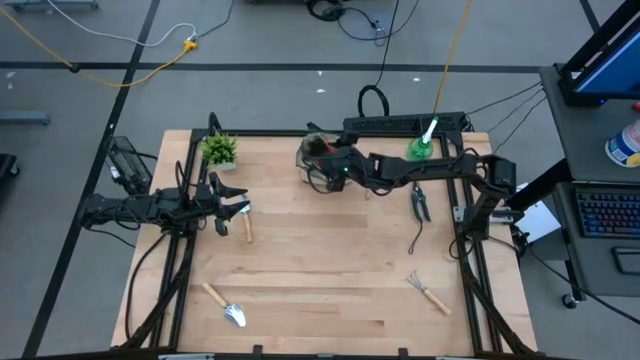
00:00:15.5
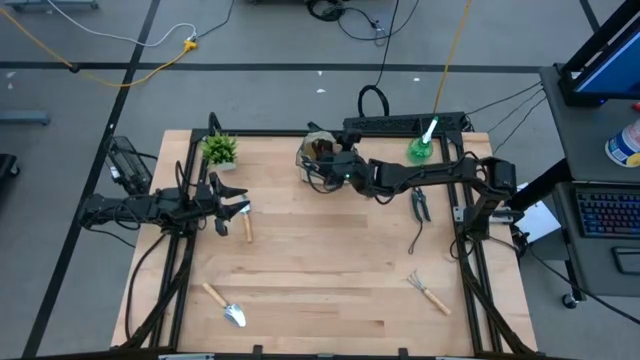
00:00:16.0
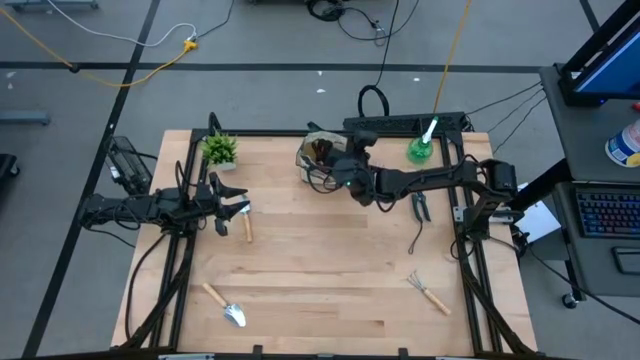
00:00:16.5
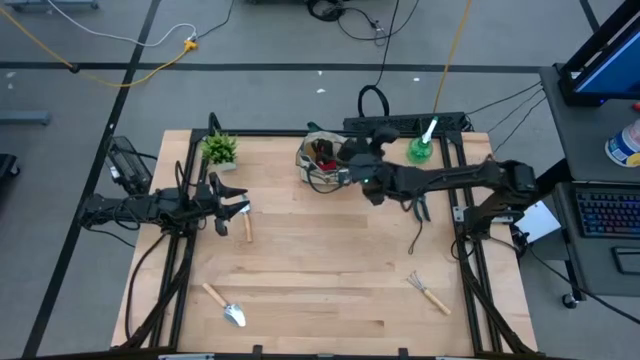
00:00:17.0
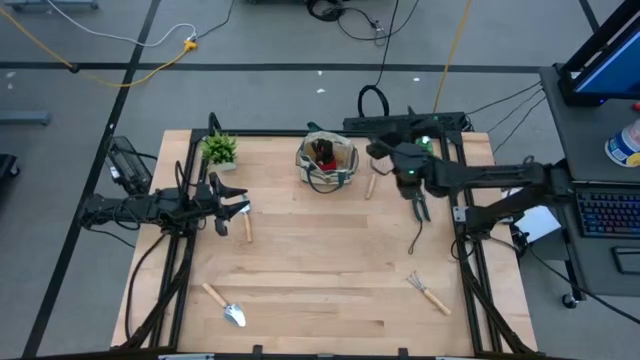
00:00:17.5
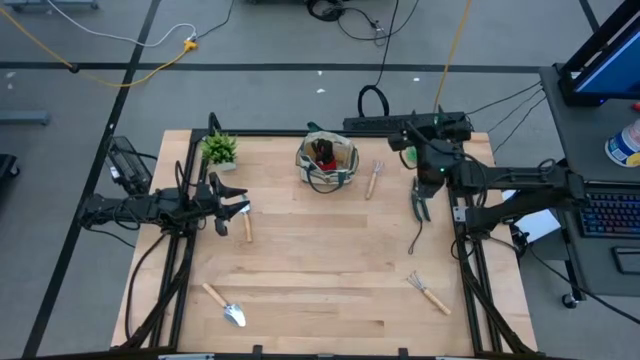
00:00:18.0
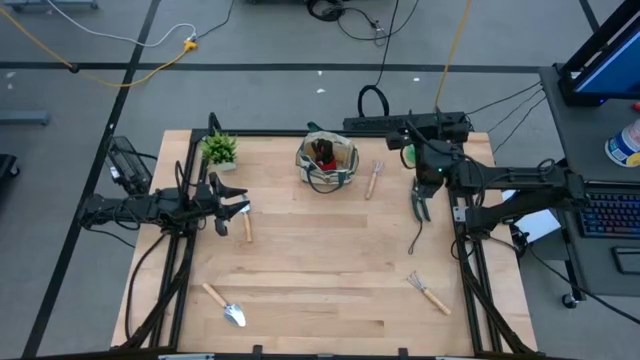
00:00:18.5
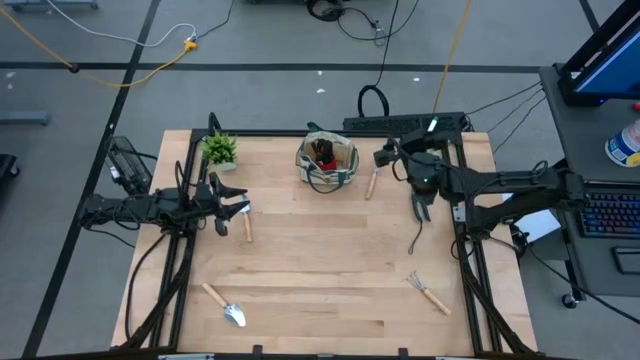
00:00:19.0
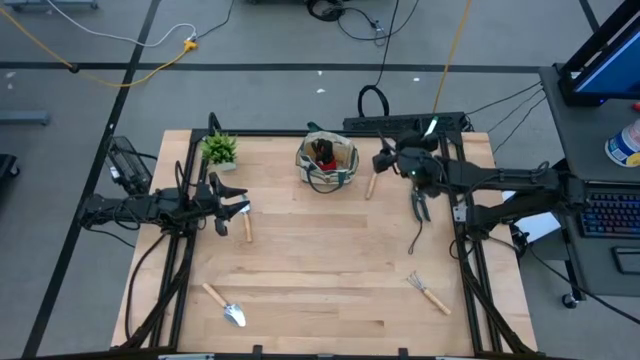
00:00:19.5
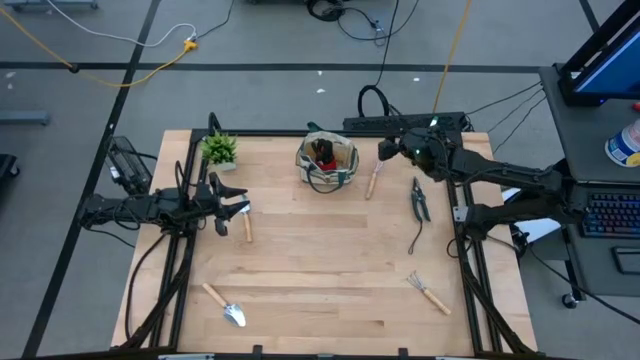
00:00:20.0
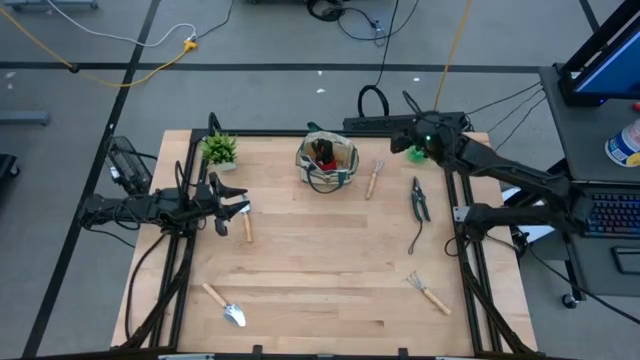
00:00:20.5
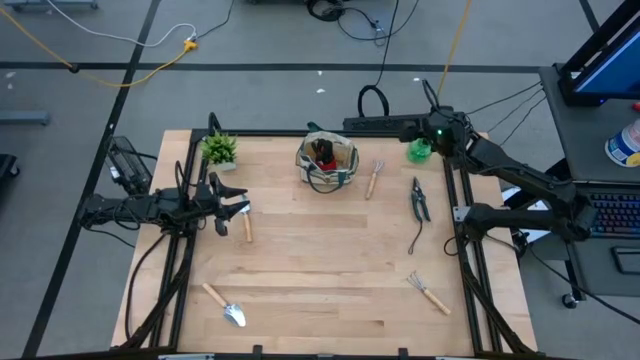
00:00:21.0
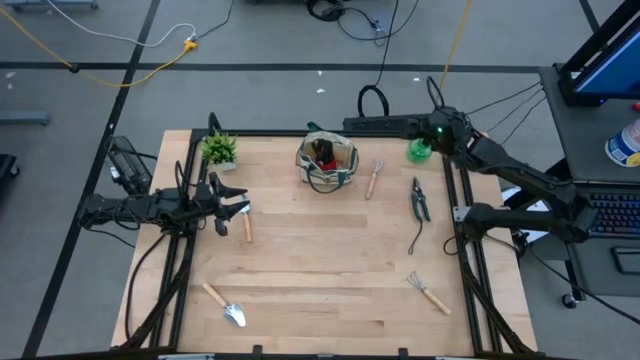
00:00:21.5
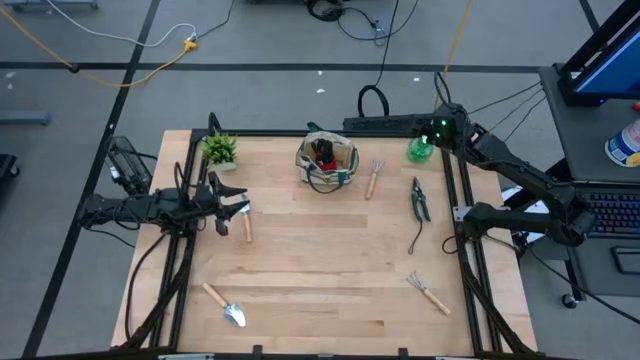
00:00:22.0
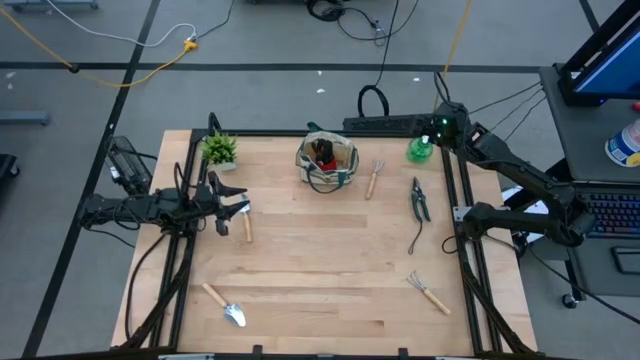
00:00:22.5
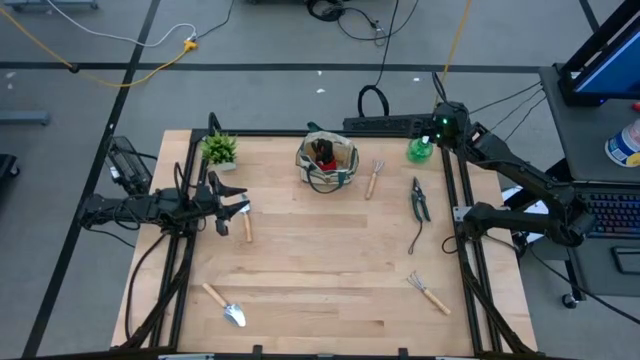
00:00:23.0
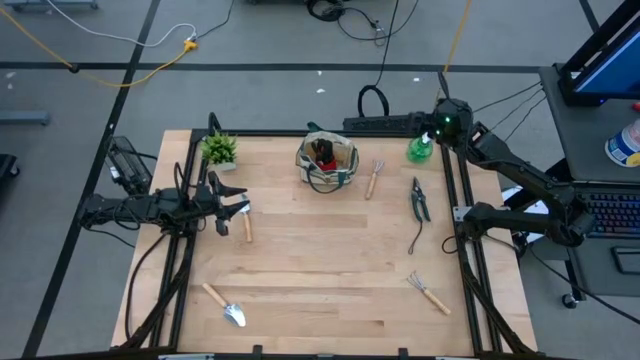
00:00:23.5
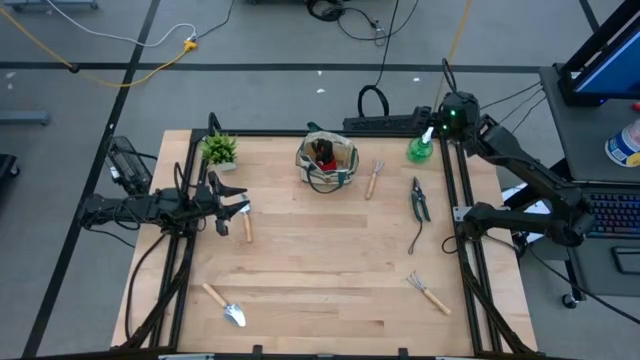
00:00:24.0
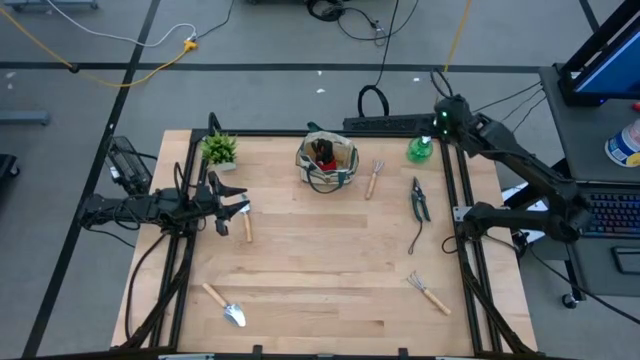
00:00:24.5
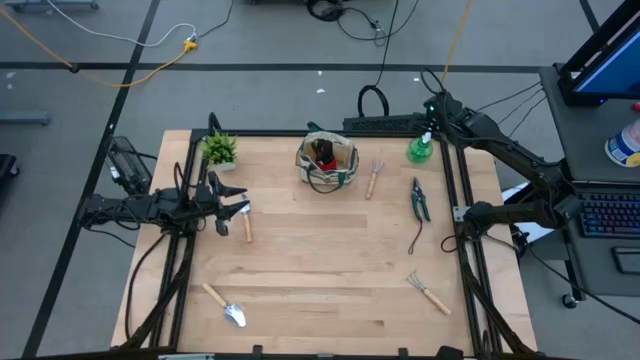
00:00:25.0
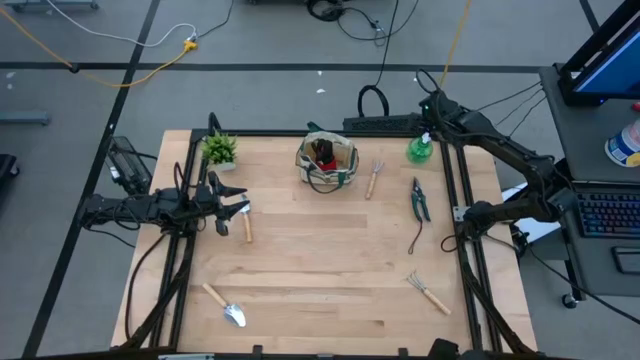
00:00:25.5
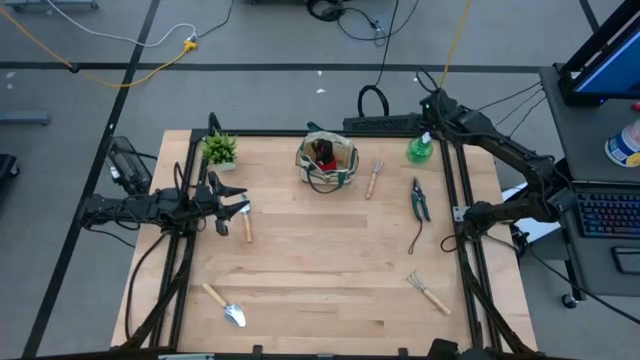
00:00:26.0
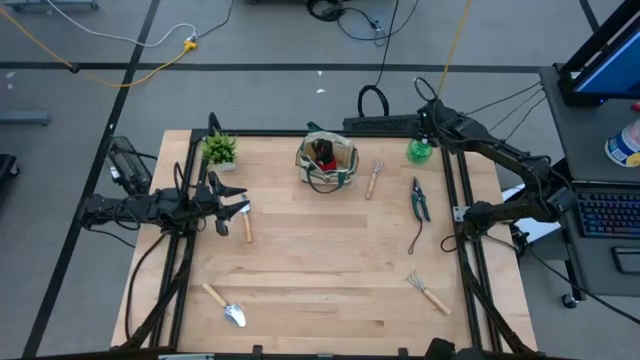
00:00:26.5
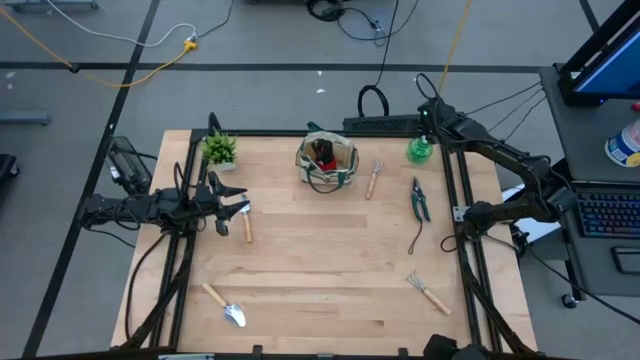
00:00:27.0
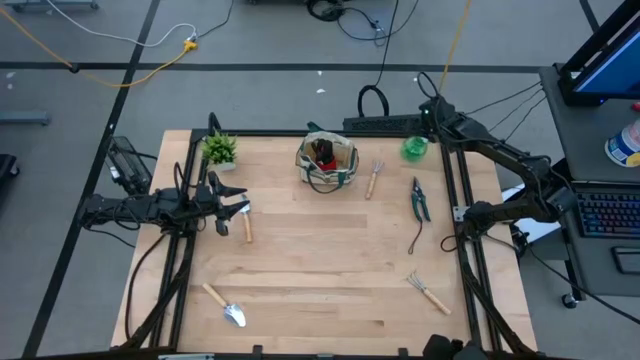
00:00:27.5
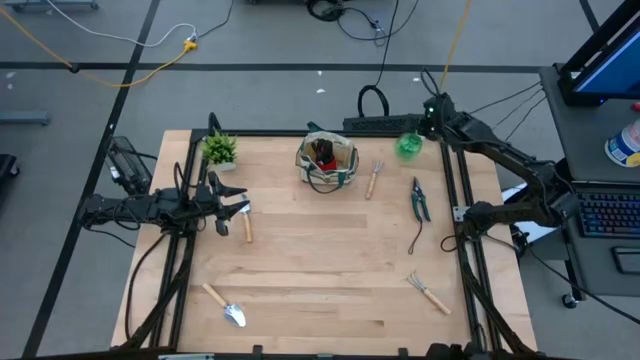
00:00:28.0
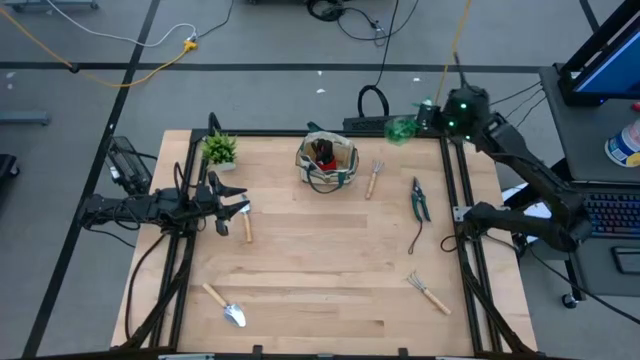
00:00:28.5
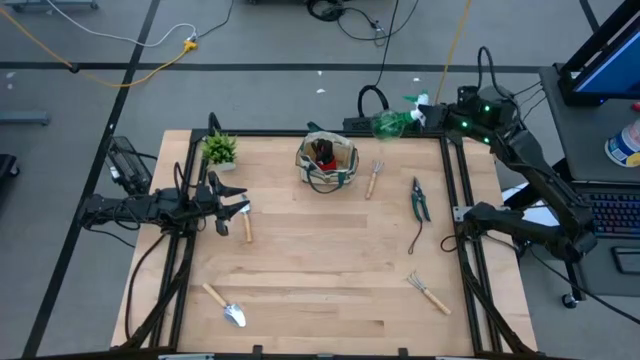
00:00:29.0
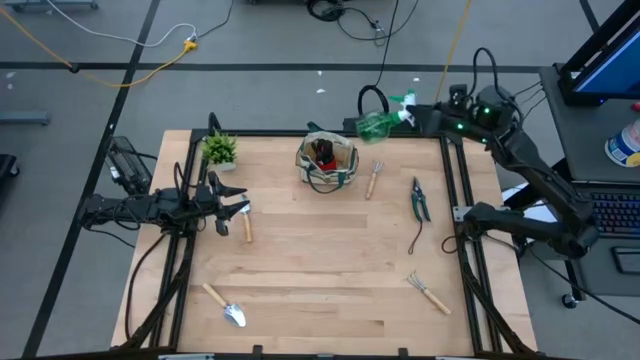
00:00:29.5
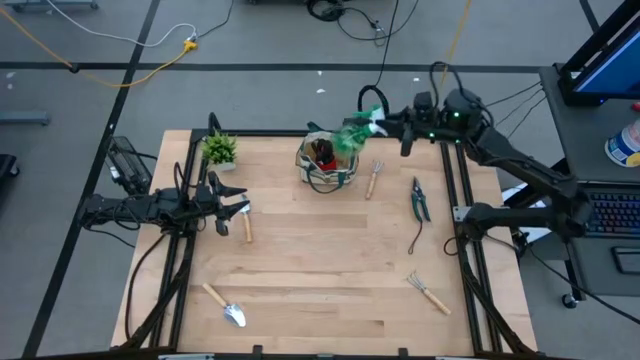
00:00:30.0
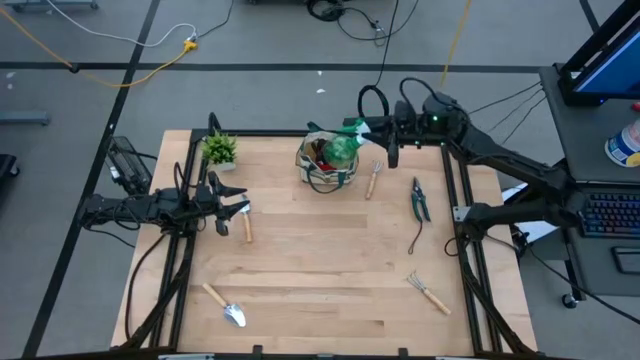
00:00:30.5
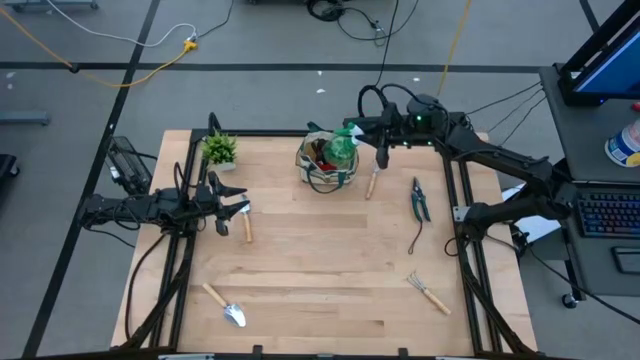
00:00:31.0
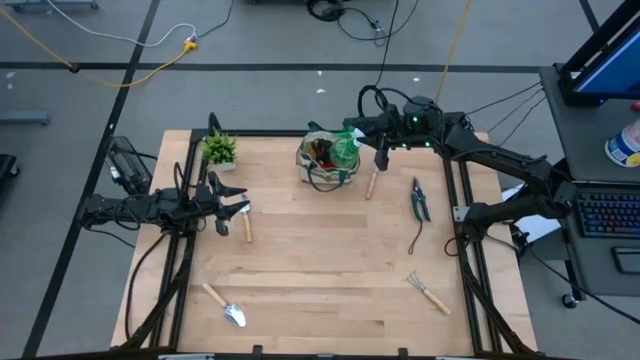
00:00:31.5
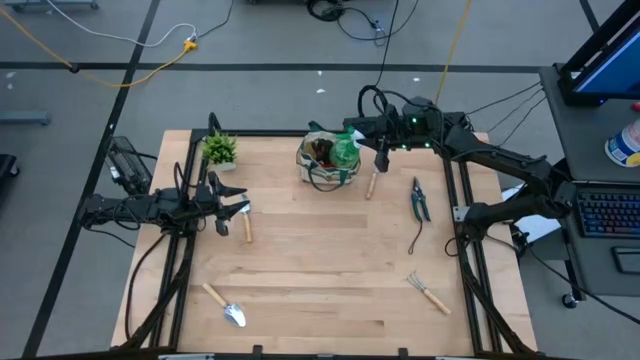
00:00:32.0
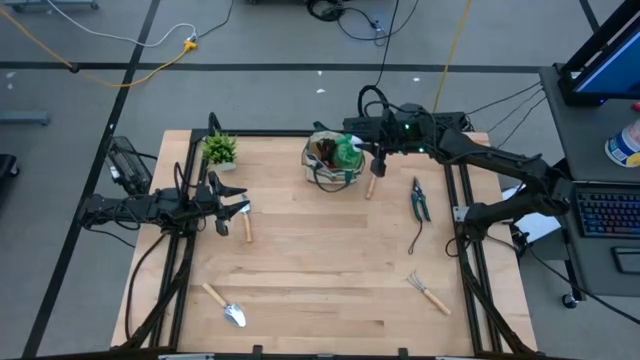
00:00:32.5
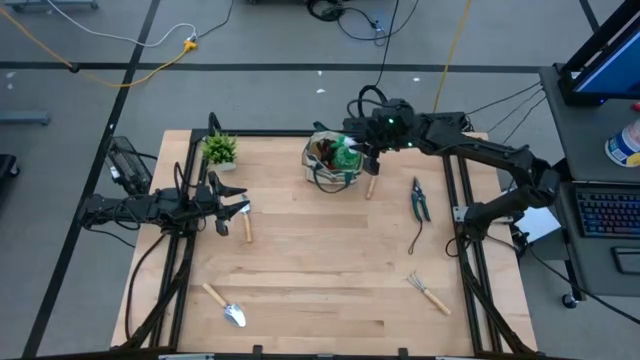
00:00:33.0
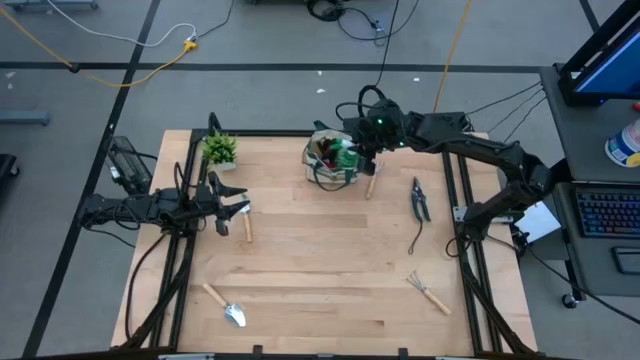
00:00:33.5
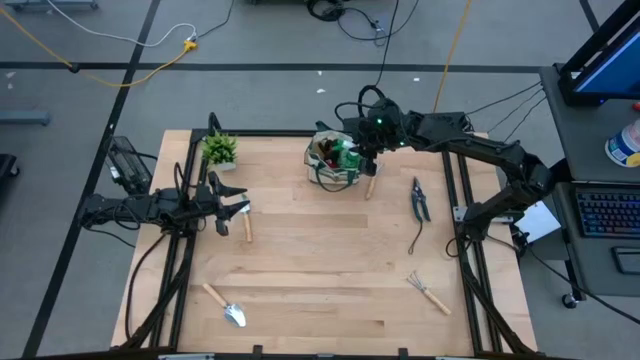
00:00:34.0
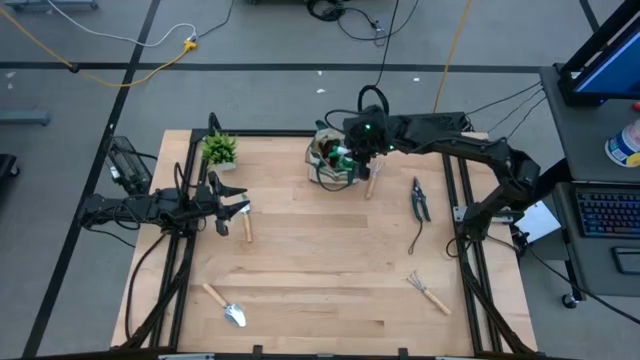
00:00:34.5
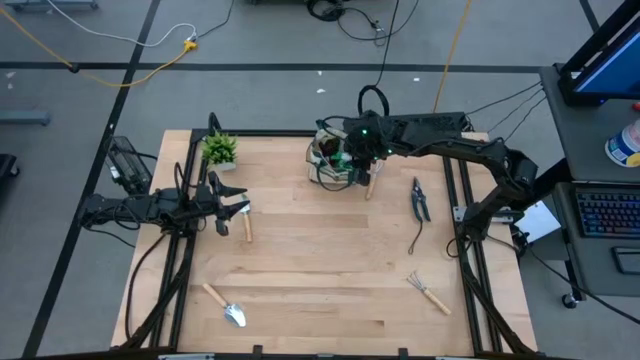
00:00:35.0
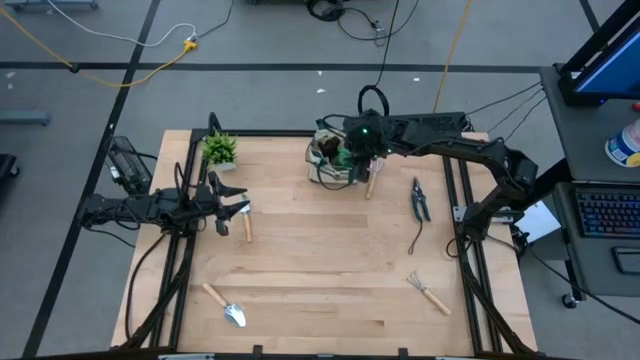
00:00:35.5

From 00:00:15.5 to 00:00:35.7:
Task: Pick & Place Garden tools in Gardening bag
Put the green spray bottle into the gardening bag
